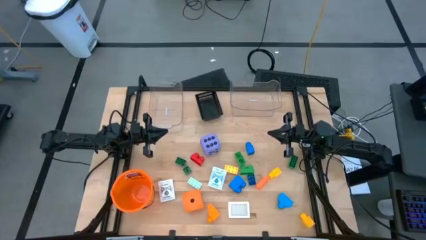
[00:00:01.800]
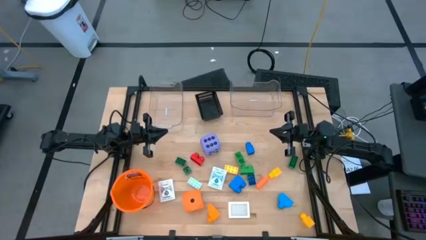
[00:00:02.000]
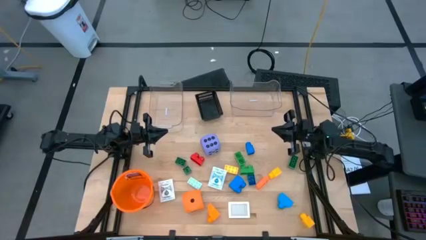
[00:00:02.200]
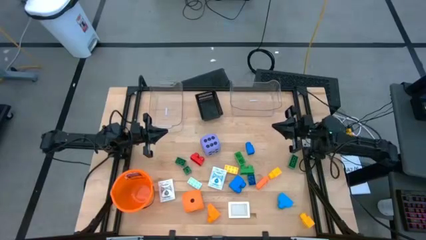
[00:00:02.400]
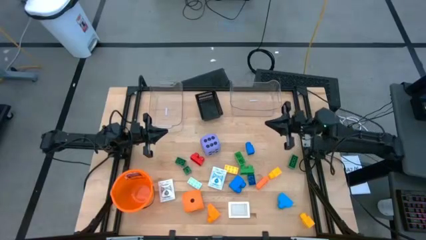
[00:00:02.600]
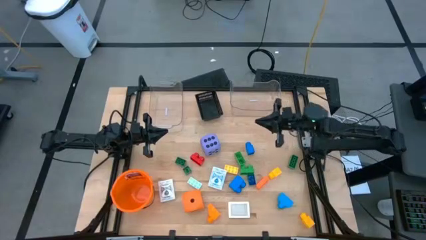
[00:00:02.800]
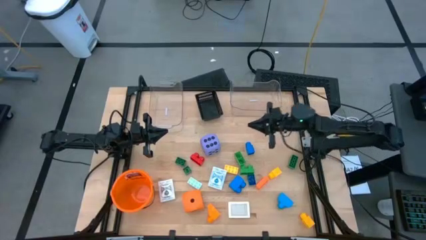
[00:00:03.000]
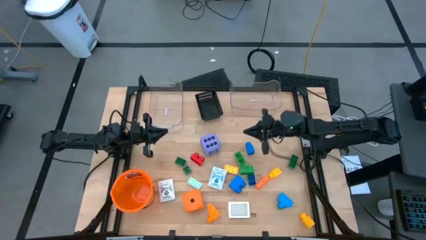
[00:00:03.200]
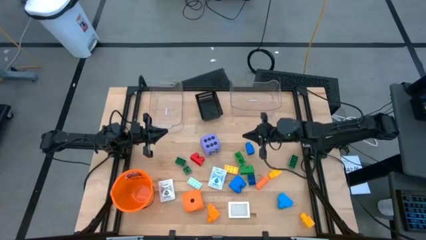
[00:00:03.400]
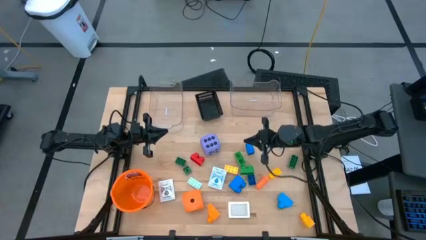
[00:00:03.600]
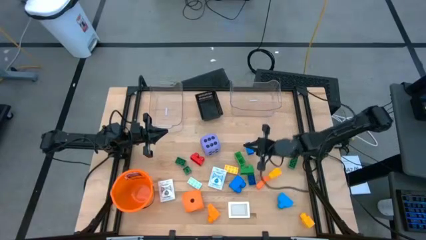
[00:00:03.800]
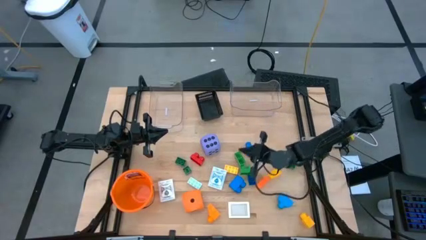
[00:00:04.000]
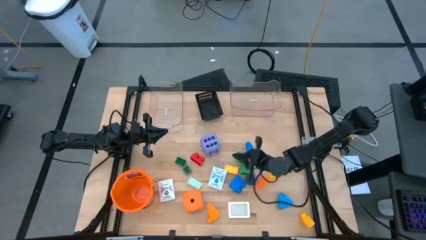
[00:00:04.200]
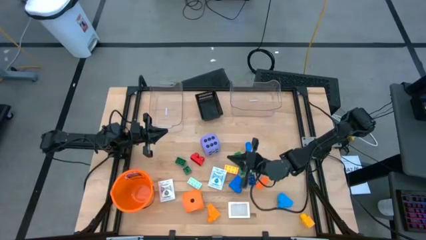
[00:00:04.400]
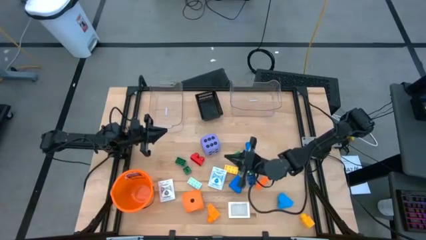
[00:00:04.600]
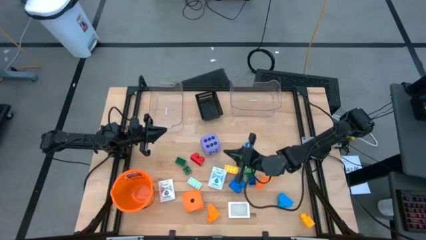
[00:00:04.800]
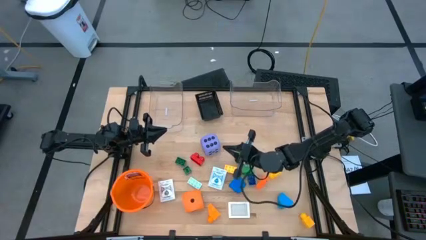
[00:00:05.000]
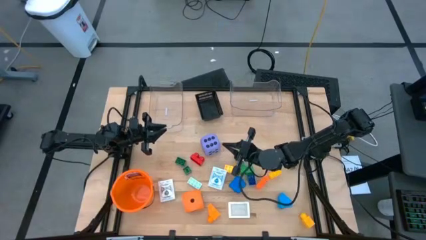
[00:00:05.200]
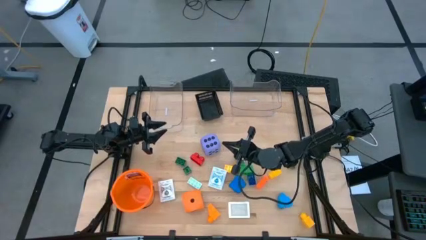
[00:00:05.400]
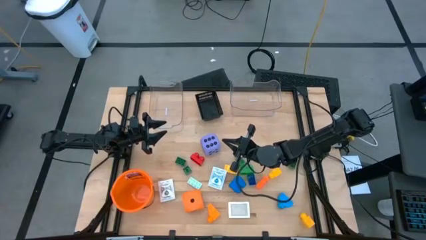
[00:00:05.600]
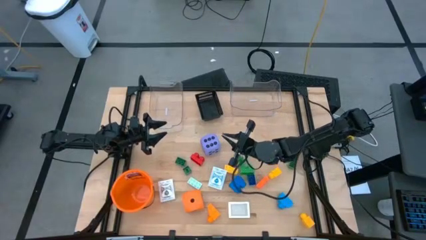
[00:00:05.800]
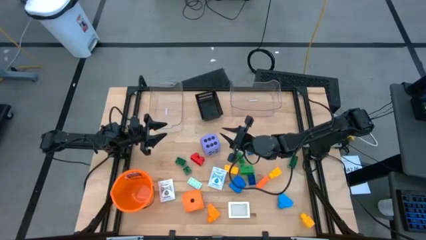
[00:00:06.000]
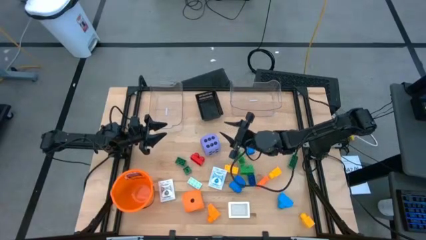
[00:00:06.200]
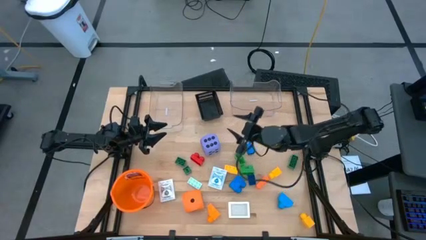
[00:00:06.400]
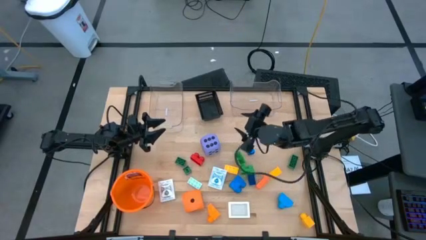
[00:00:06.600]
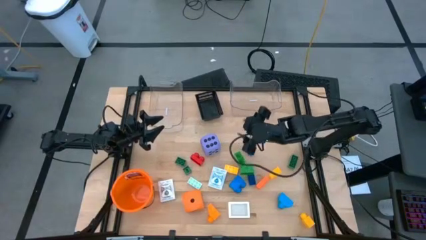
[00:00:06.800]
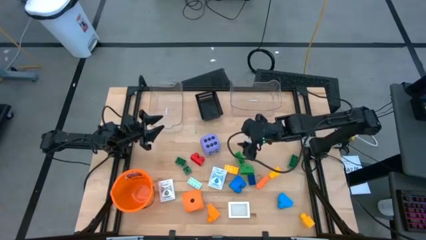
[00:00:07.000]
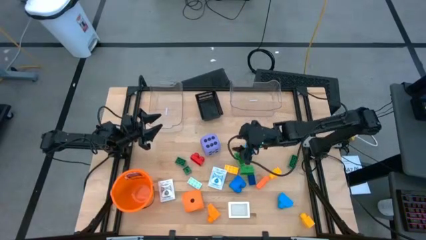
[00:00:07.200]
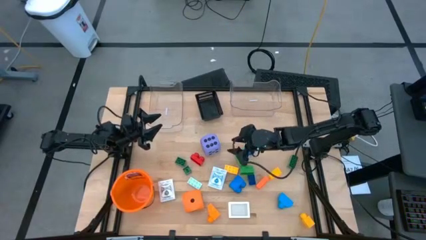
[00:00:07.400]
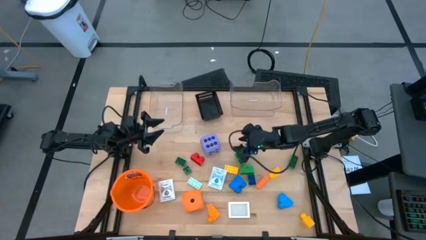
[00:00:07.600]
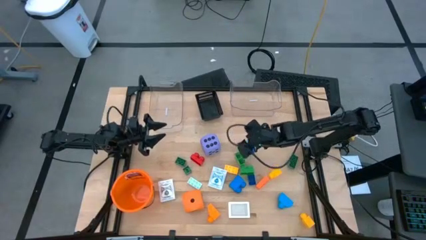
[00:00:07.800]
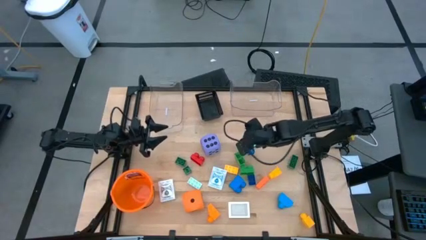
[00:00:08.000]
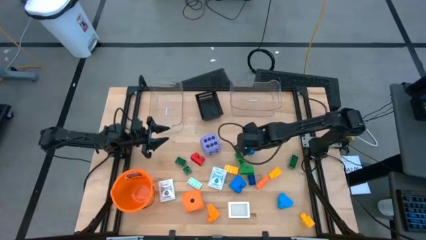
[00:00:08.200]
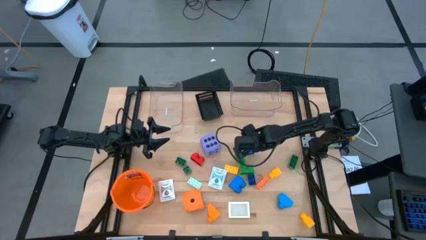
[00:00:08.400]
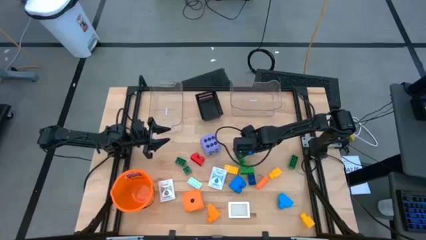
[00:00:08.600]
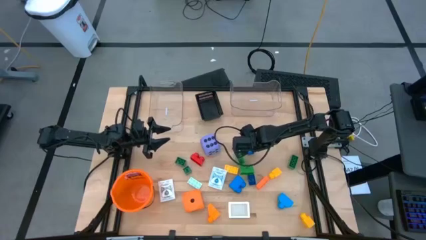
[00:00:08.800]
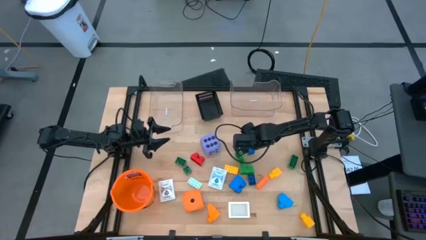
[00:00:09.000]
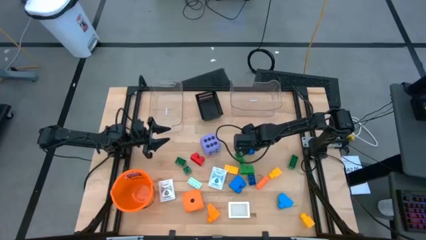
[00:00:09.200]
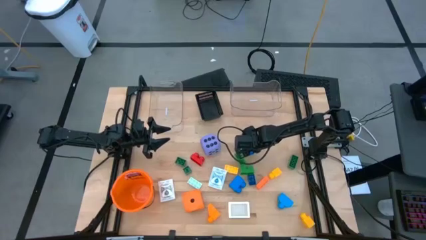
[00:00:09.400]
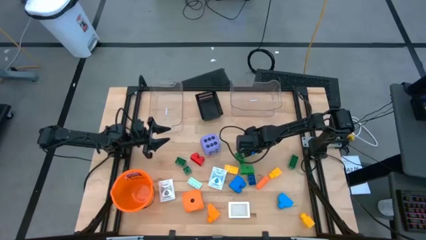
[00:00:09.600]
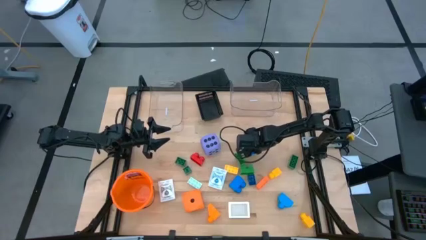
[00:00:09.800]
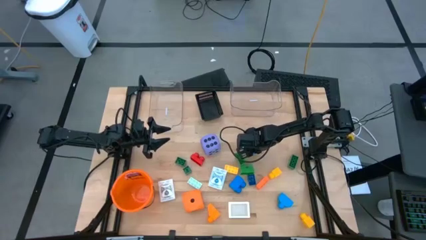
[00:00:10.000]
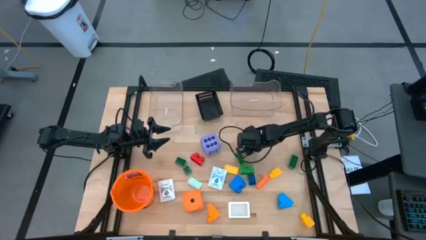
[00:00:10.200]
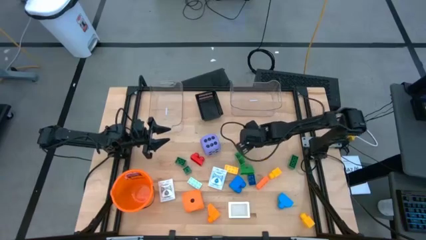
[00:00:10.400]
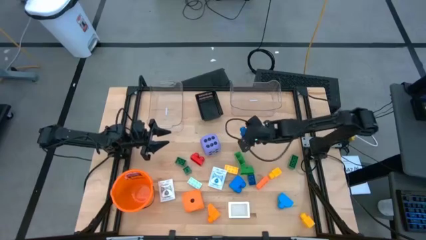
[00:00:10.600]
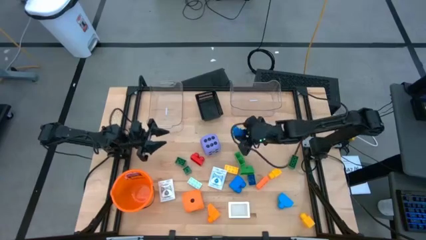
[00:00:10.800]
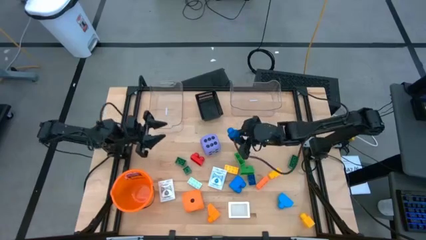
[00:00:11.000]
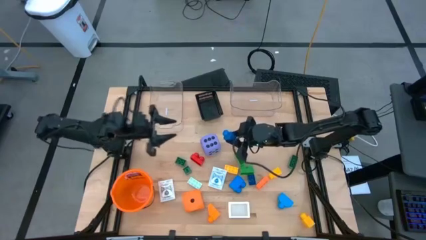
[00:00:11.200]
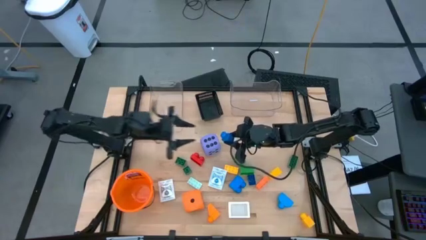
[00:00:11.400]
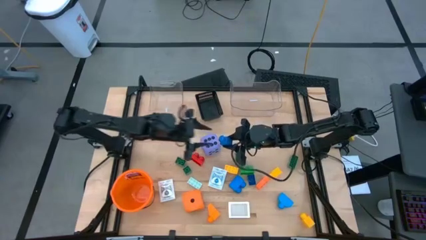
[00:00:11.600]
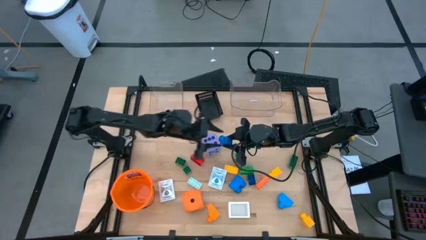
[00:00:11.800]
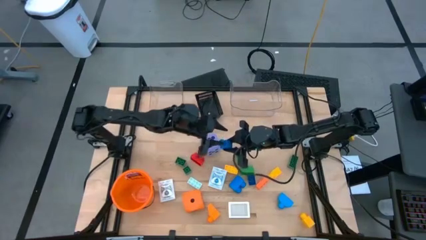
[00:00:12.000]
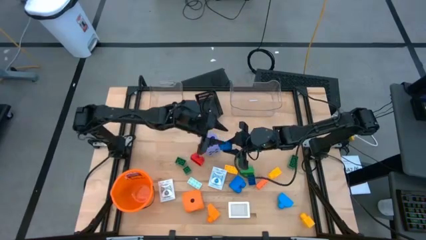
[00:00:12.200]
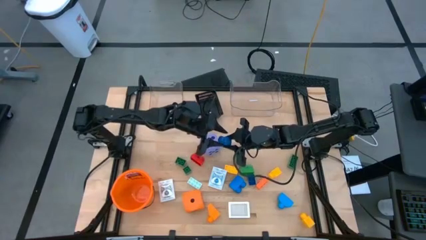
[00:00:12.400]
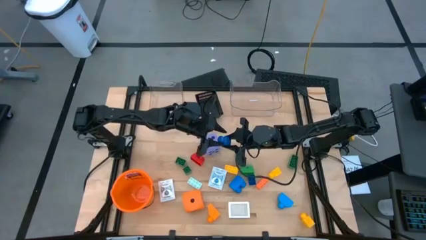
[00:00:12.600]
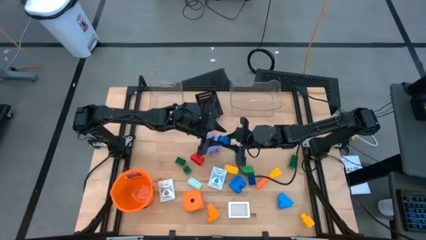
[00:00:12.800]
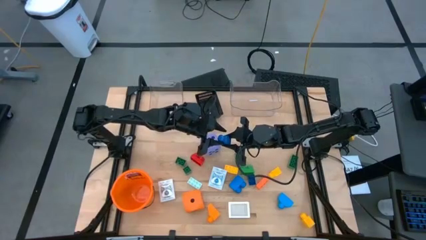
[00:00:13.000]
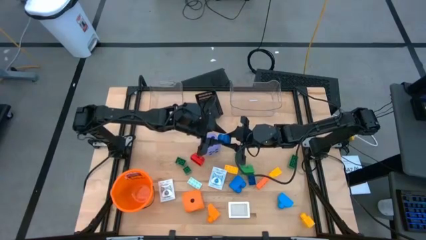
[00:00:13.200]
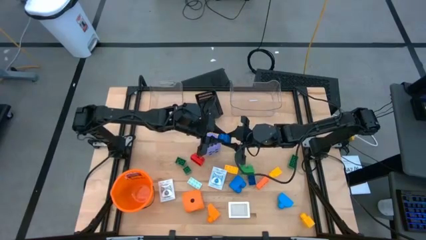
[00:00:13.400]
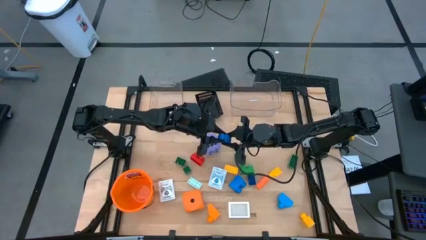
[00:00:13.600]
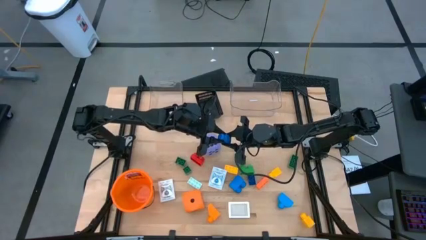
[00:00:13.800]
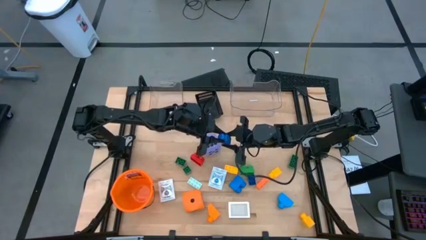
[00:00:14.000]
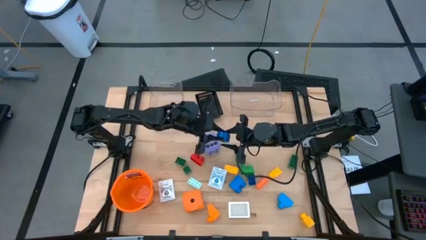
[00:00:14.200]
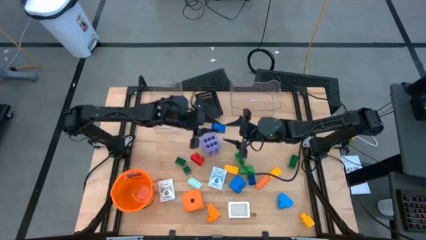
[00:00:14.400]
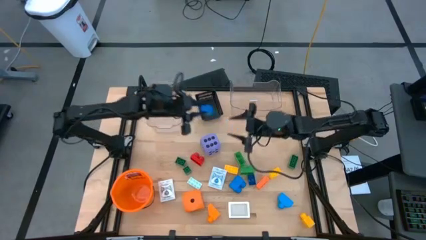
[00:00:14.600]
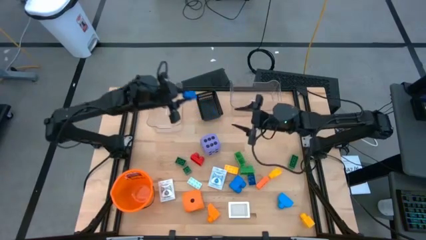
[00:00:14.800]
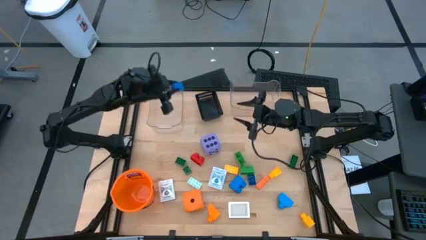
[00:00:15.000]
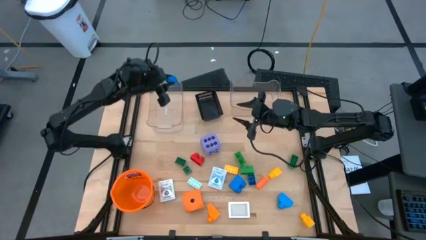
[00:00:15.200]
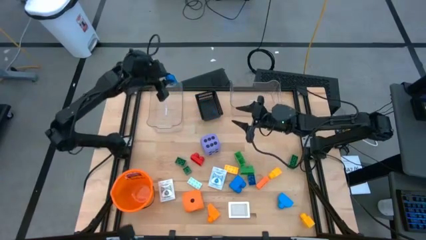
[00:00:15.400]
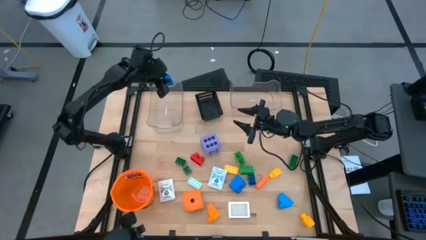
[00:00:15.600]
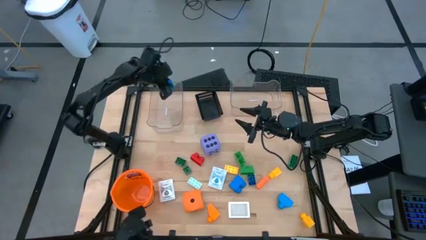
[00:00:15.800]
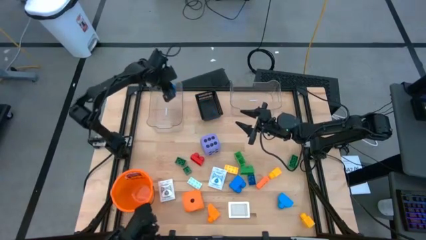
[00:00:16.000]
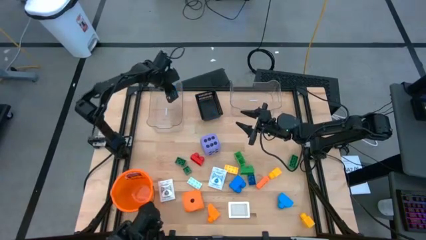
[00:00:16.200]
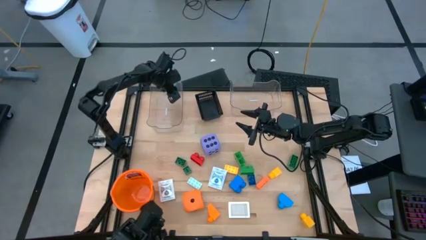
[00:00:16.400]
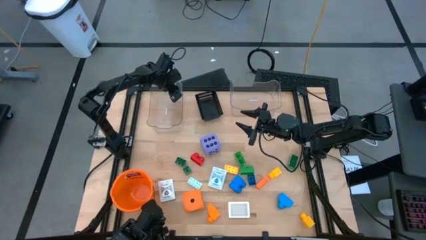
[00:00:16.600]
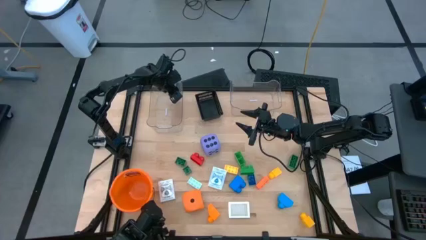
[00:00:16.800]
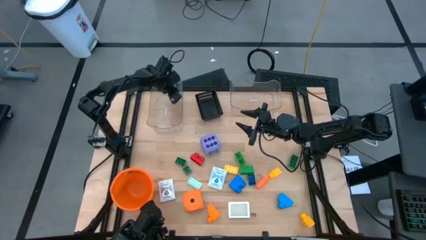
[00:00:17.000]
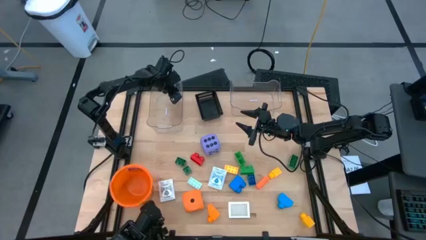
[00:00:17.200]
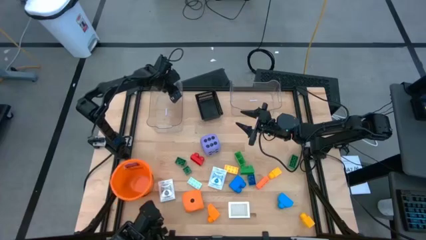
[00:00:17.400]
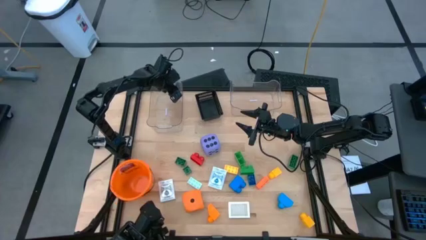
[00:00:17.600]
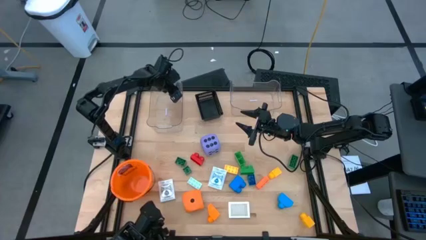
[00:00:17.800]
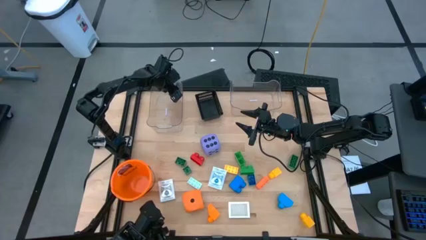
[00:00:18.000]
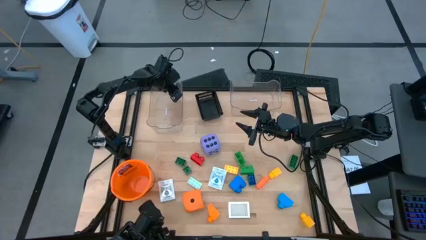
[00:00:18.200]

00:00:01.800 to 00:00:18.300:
Task: Pick & Place Toys
Put the blue gamepiece into the left transparent bin
